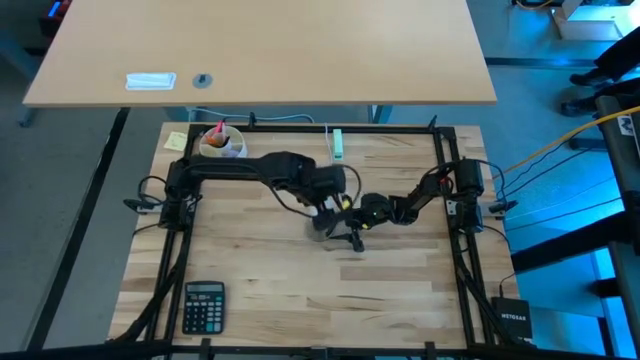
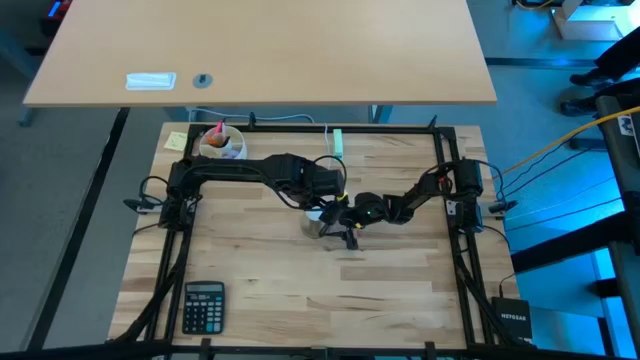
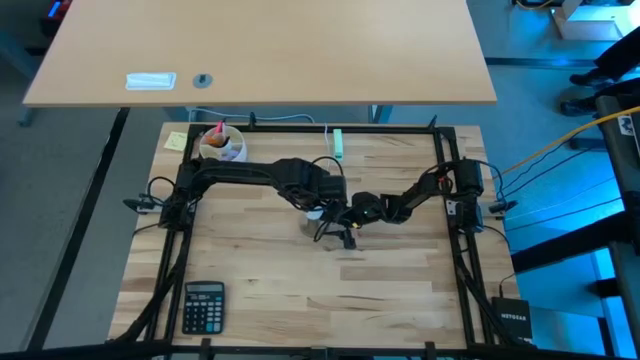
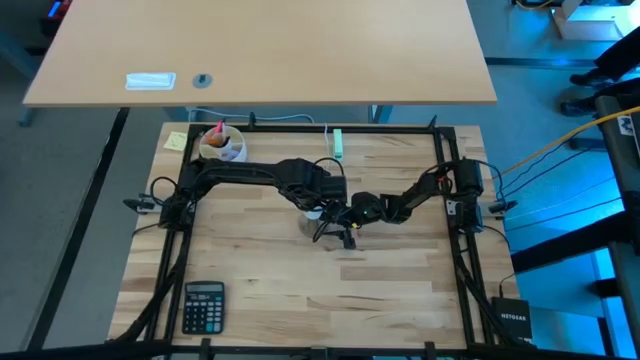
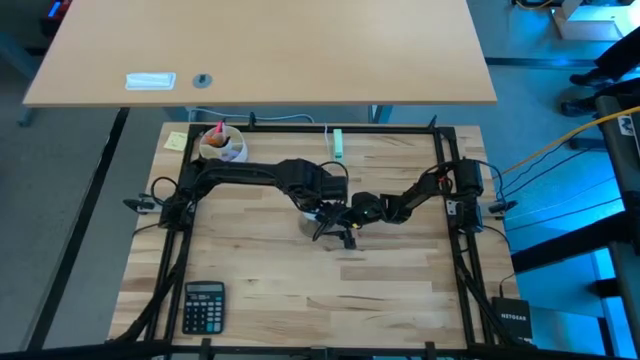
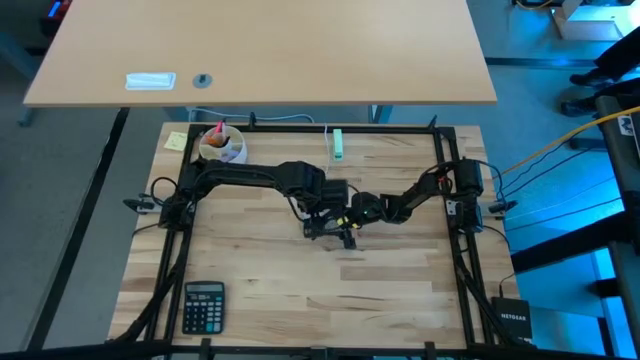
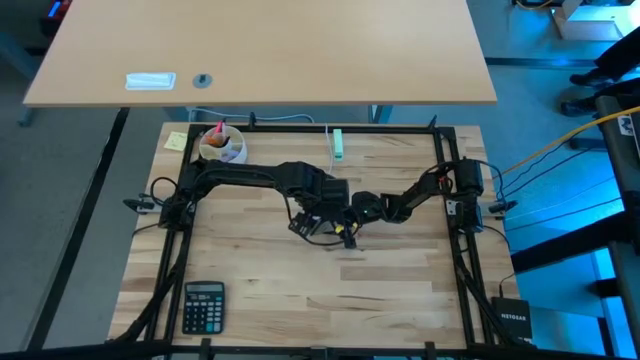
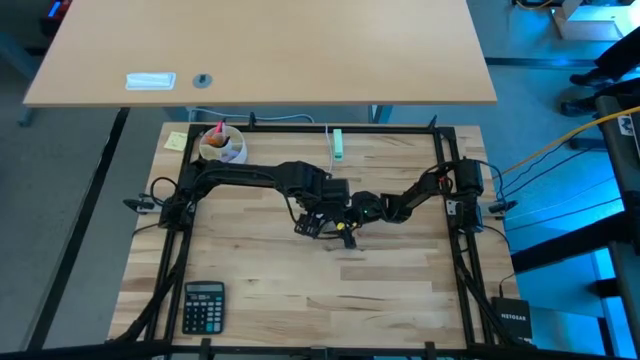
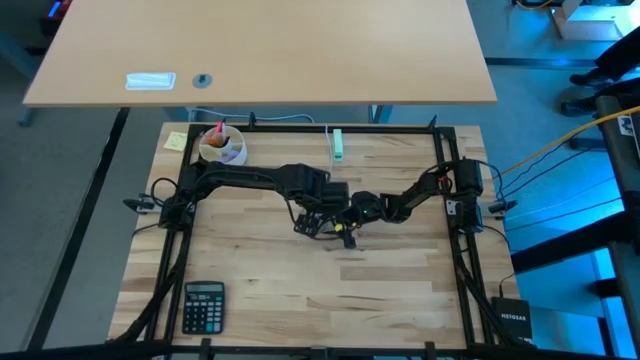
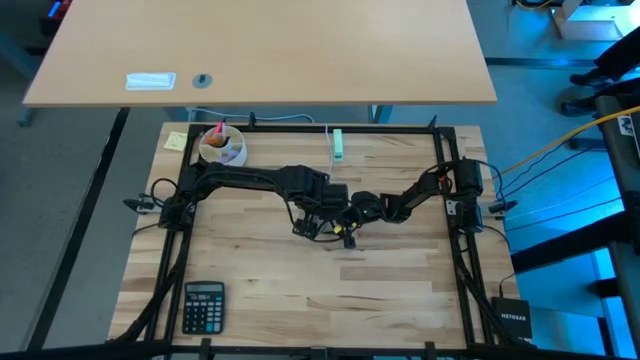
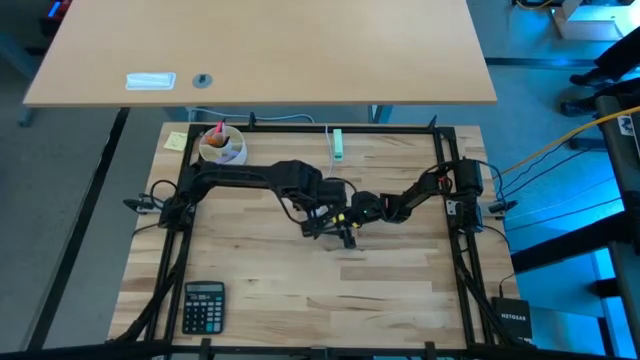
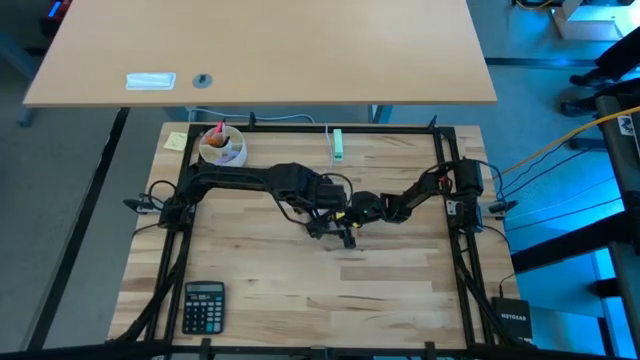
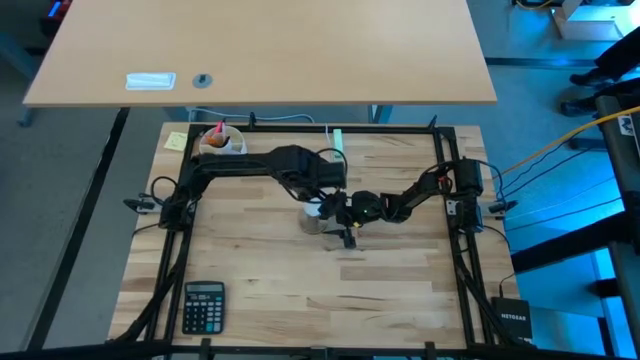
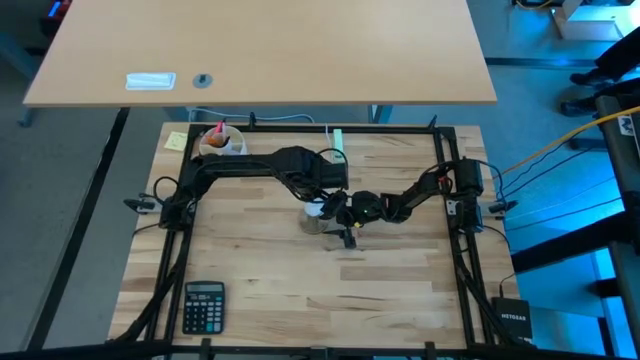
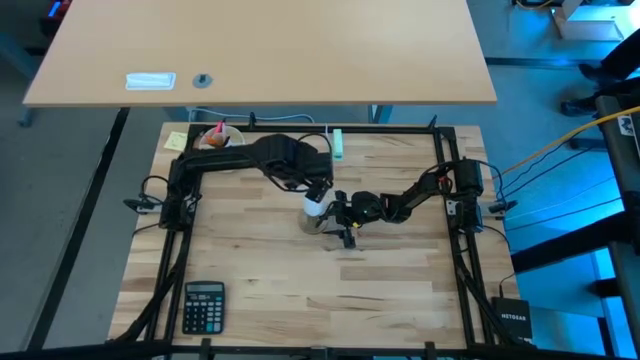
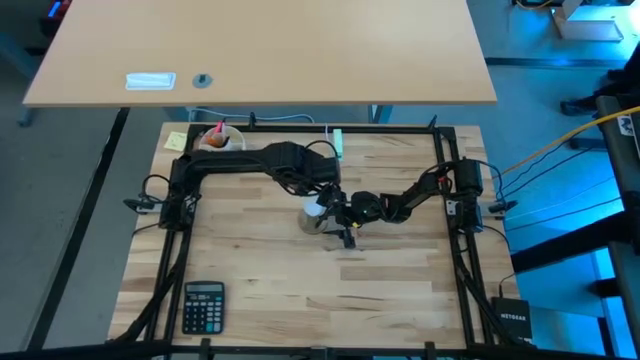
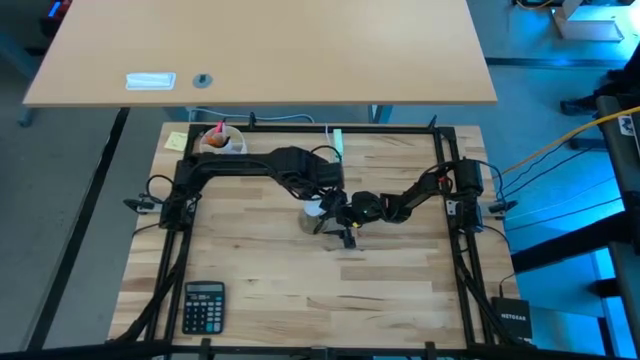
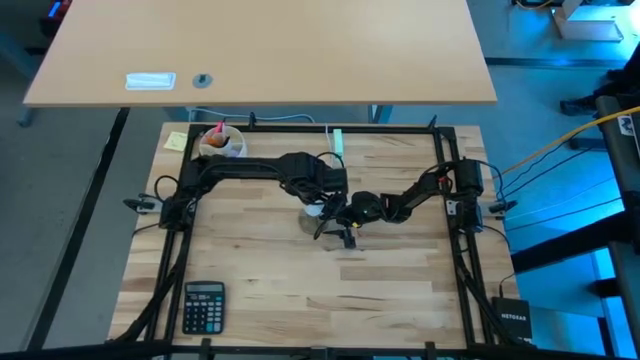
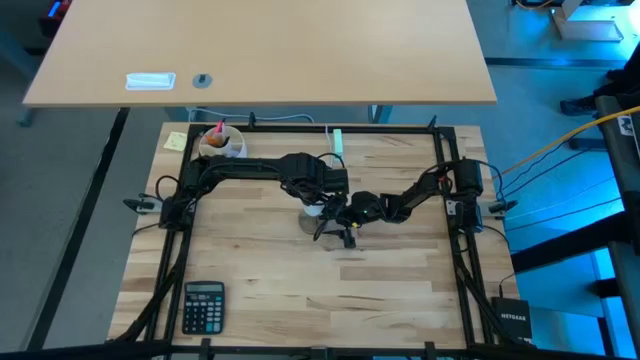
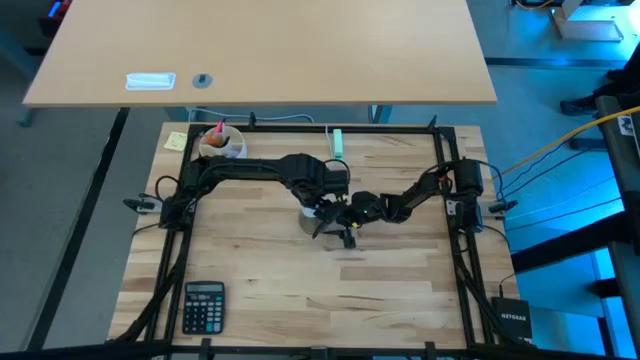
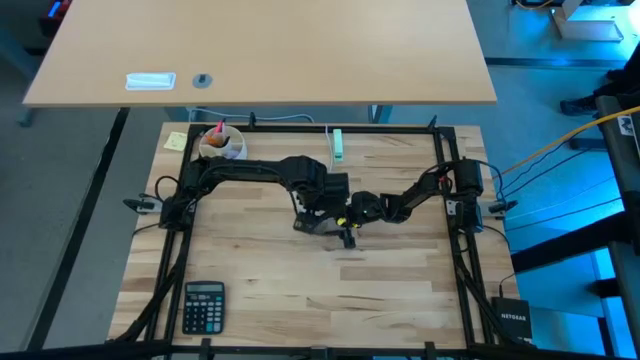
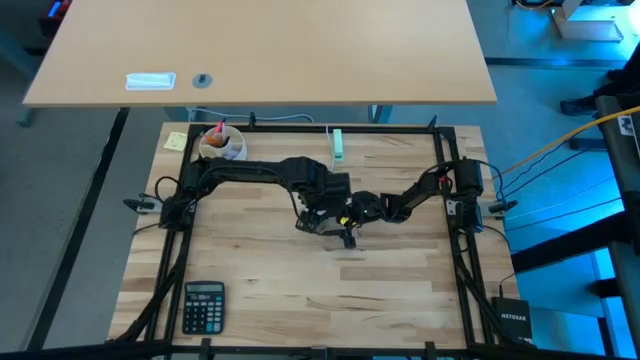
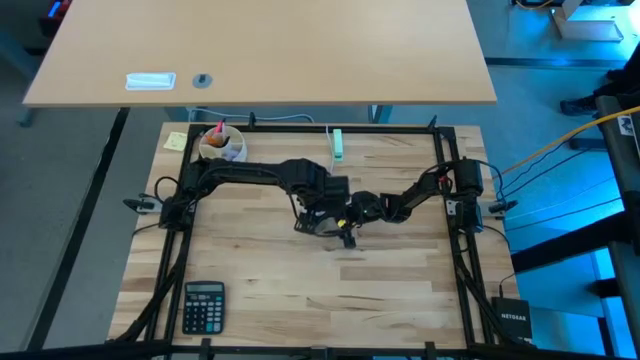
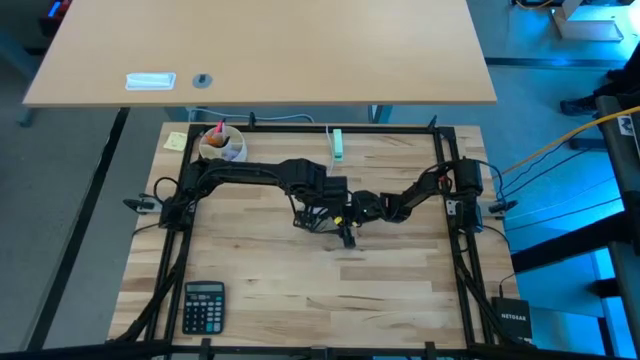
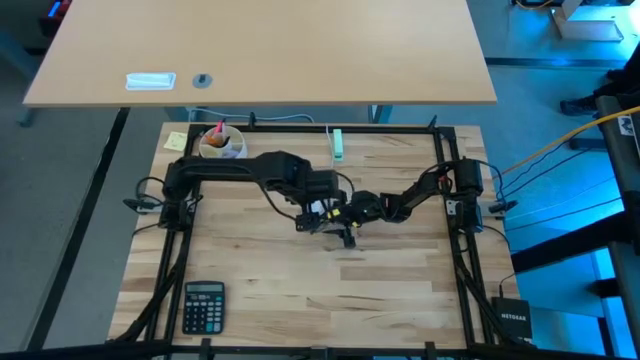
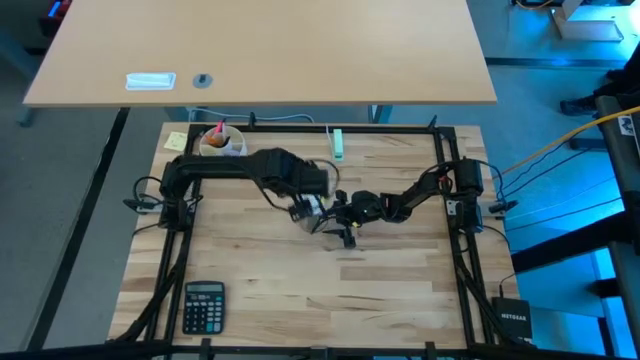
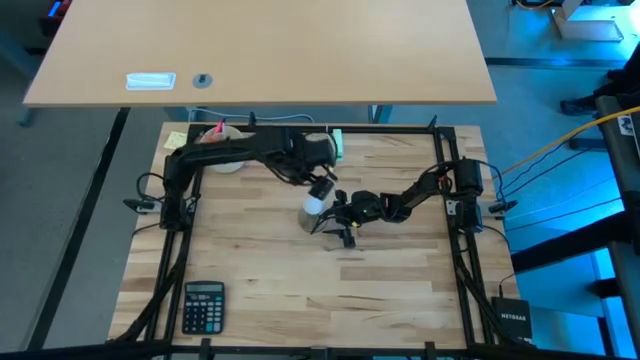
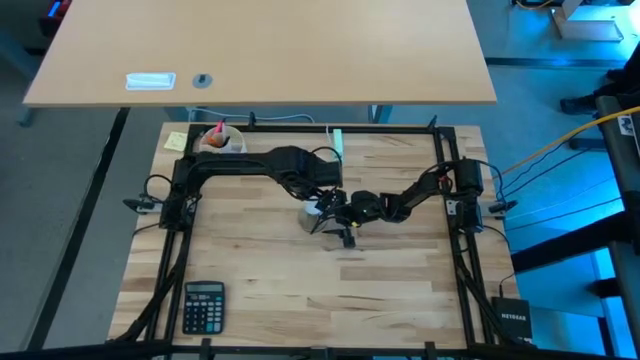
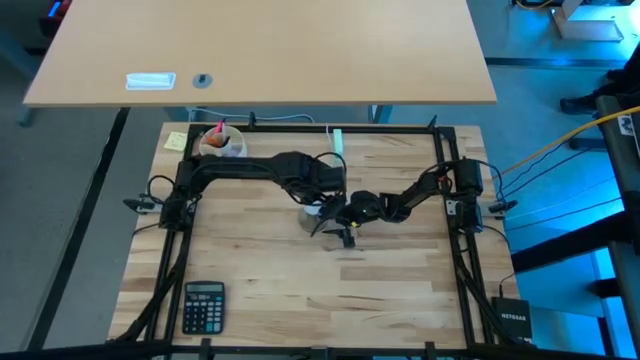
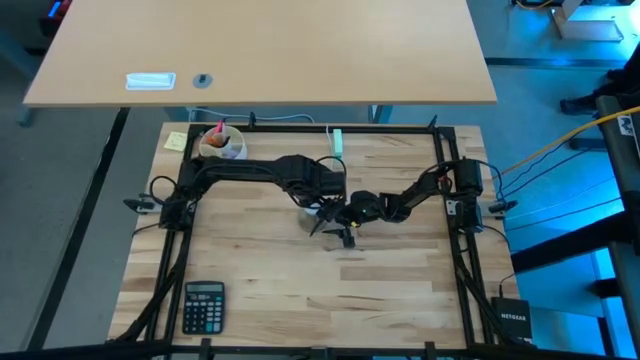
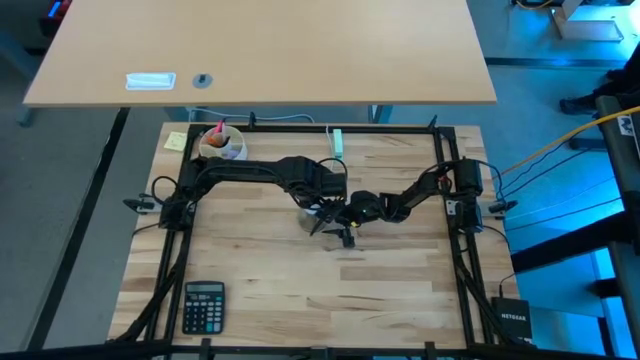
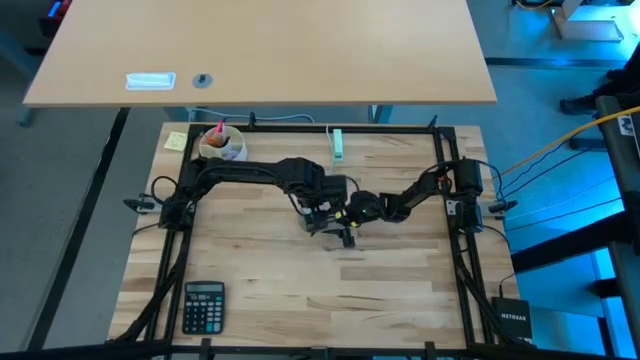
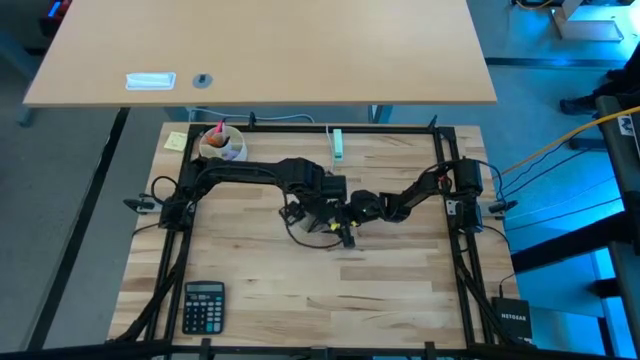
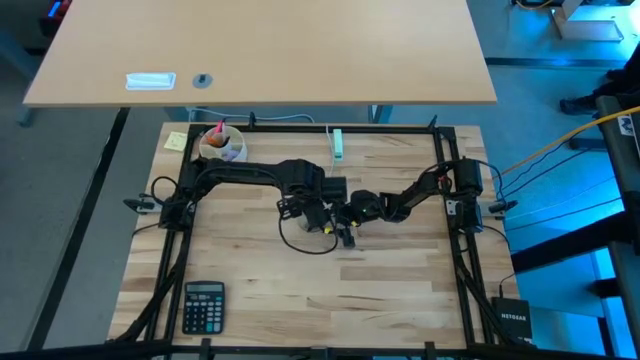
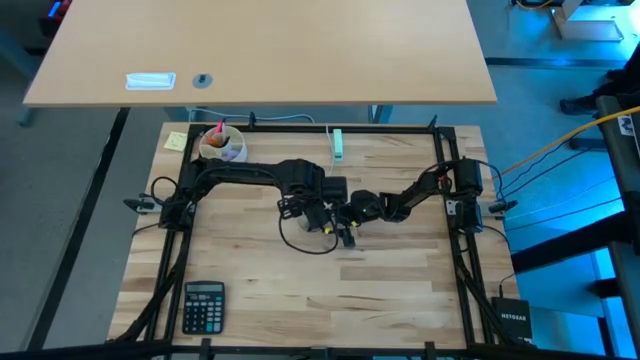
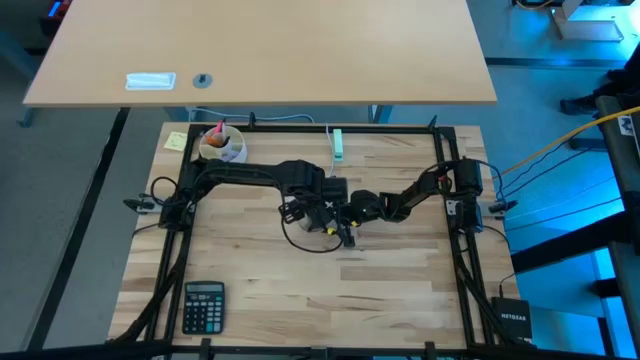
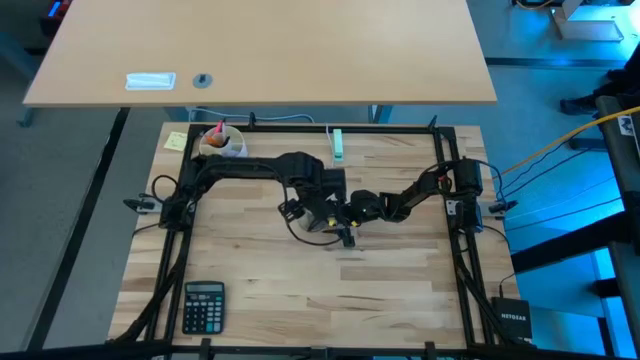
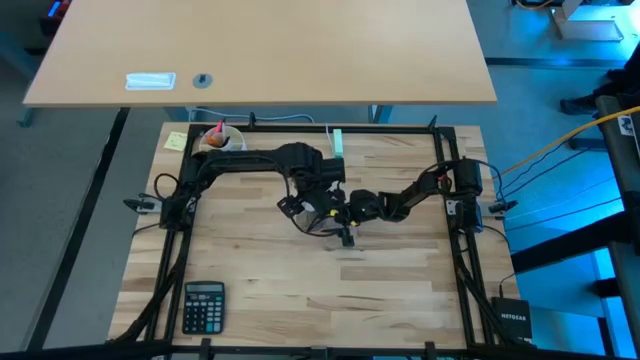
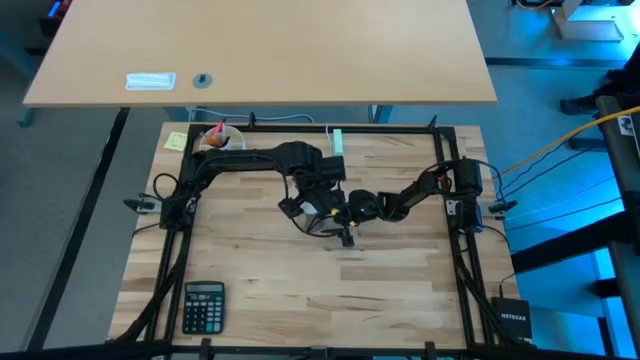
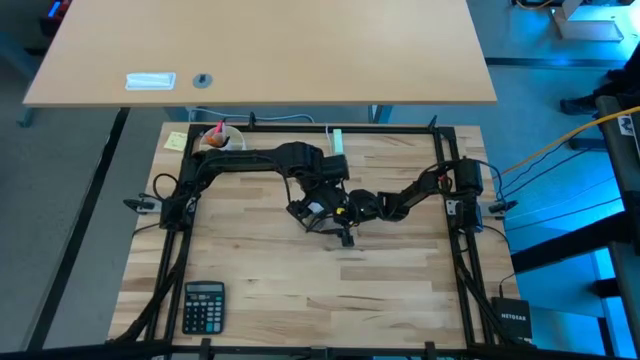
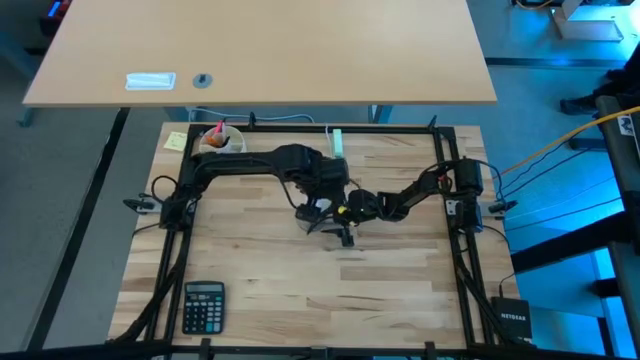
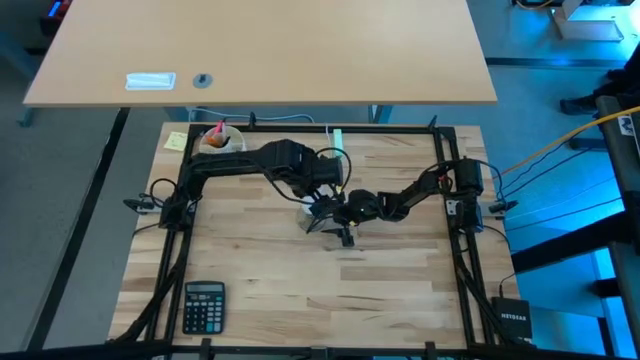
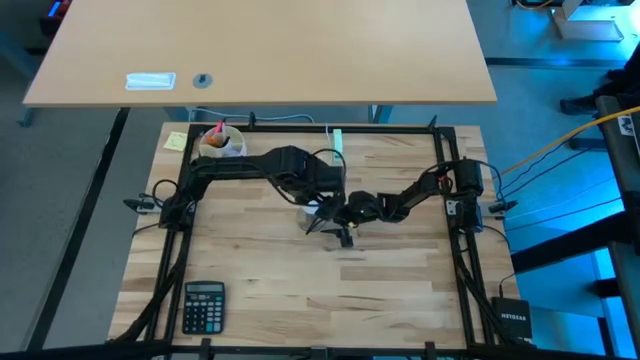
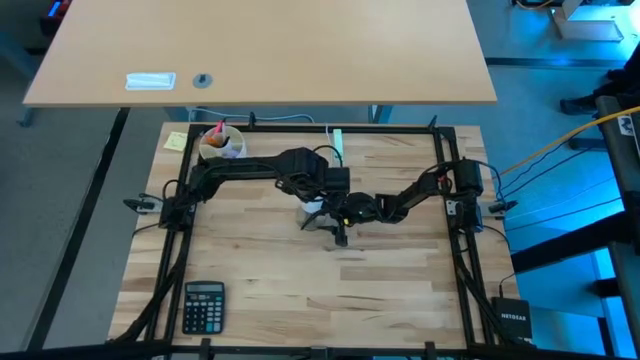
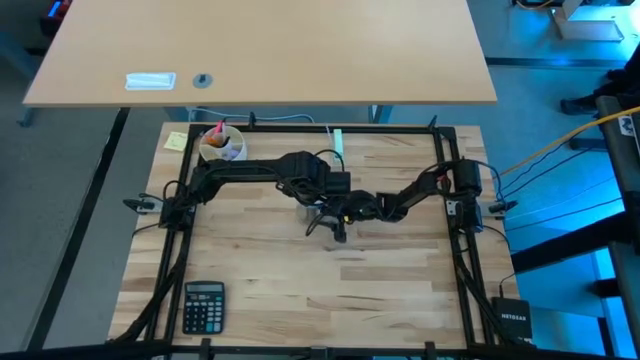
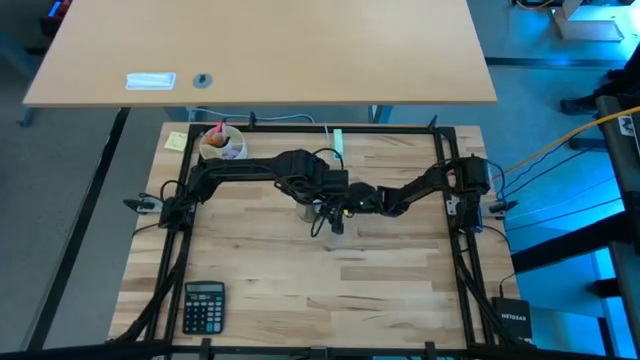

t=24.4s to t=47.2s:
Task: Screw lightbulb
Insert the lightbulb into the lamp socket
